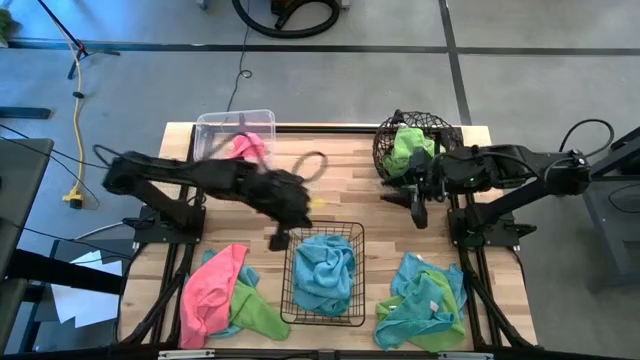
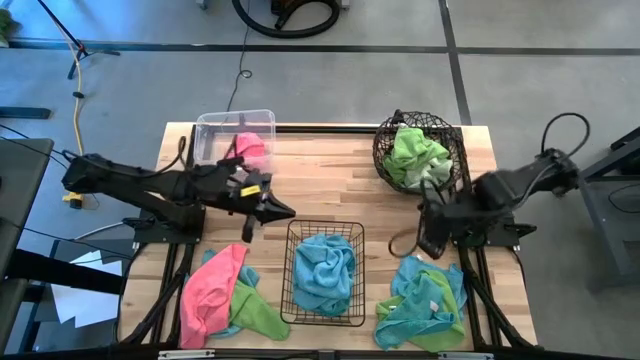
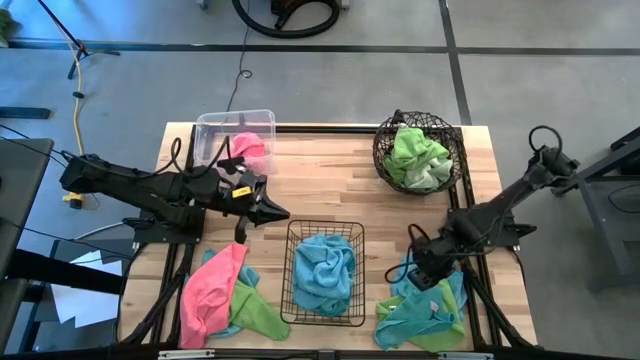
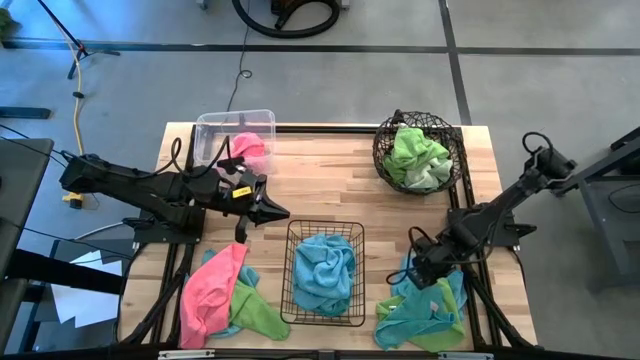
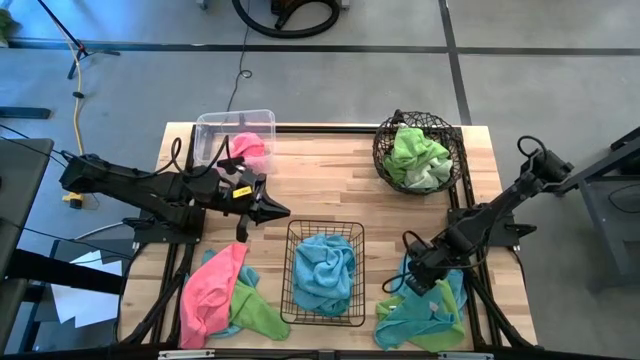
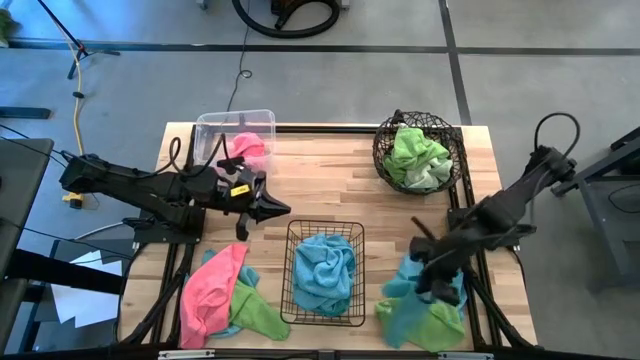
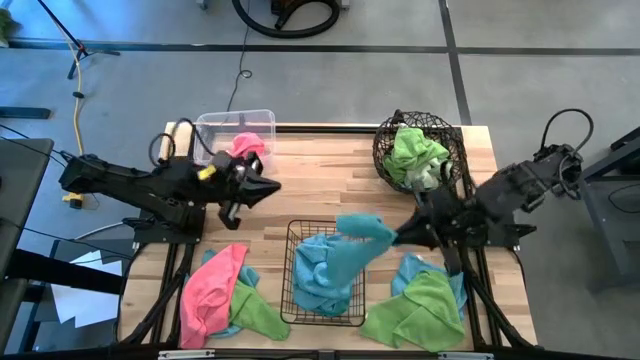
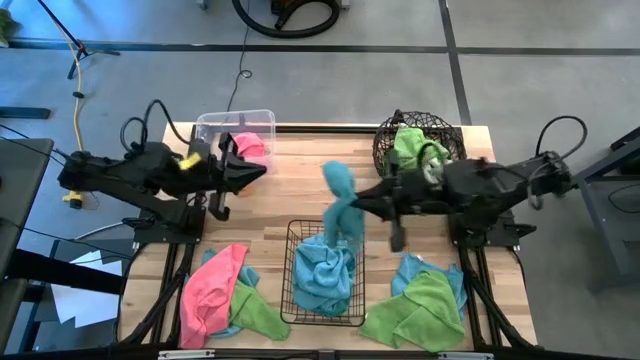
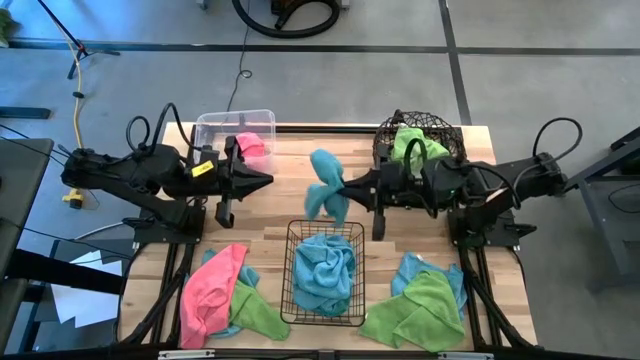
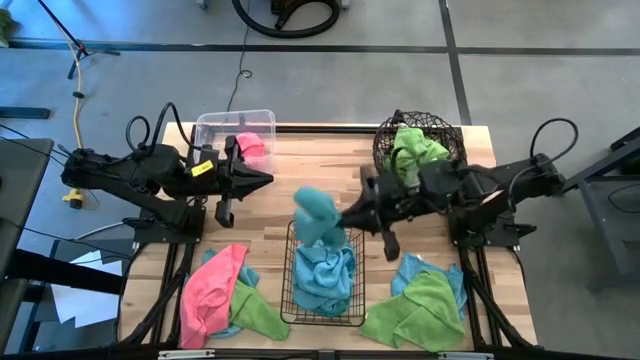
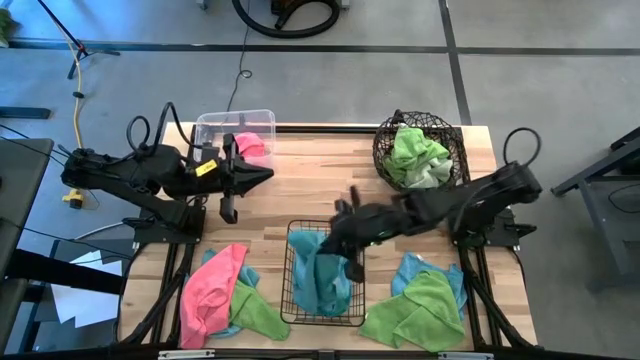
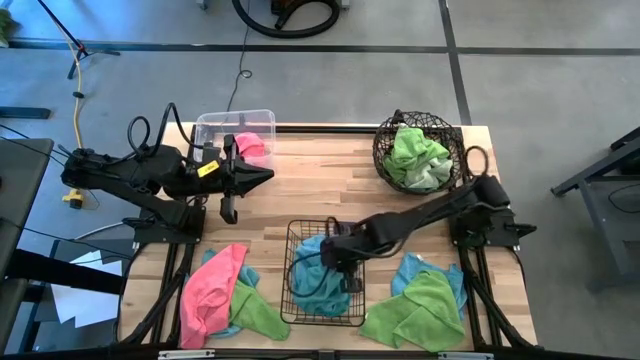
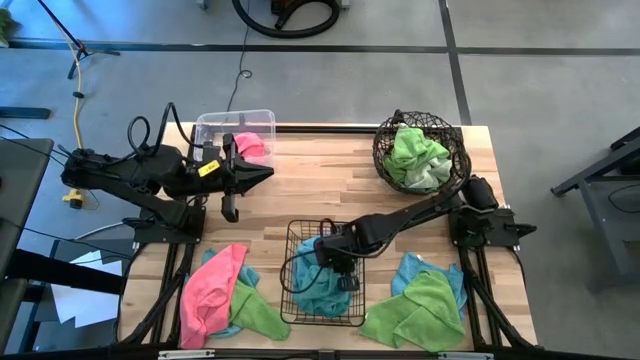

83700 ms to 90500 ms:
Task: Sort microfiber towel by color & place in baskets
Put the blue towel into the bottom basket

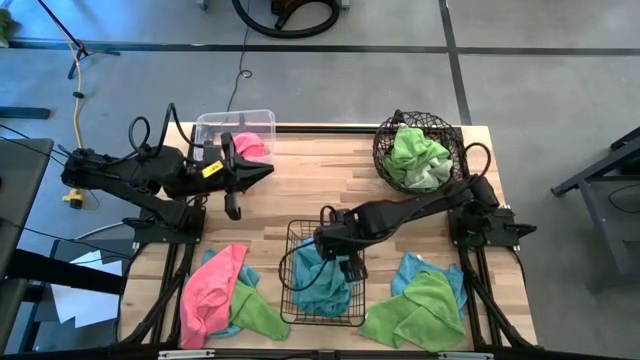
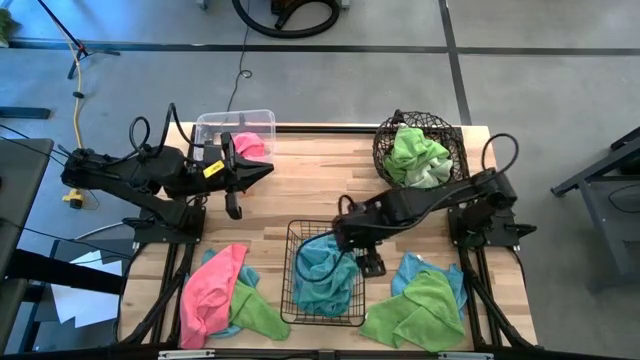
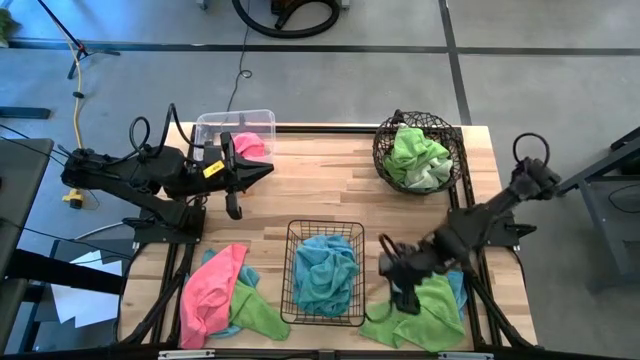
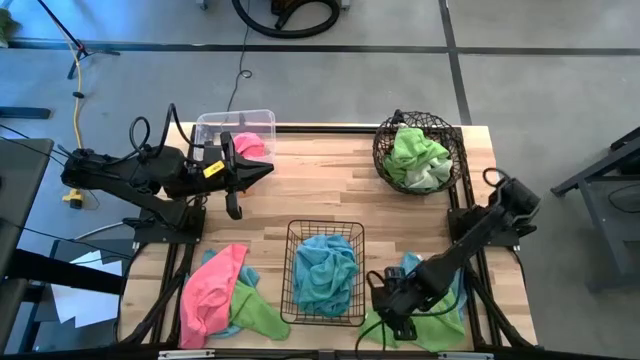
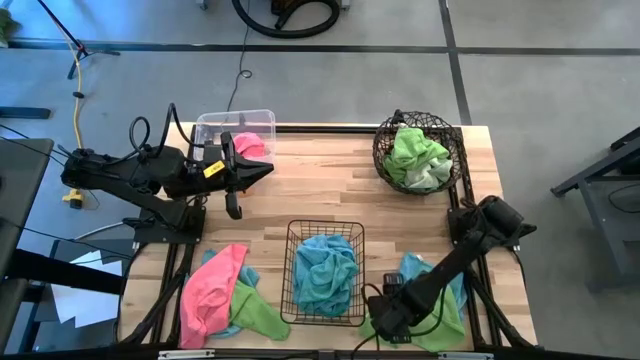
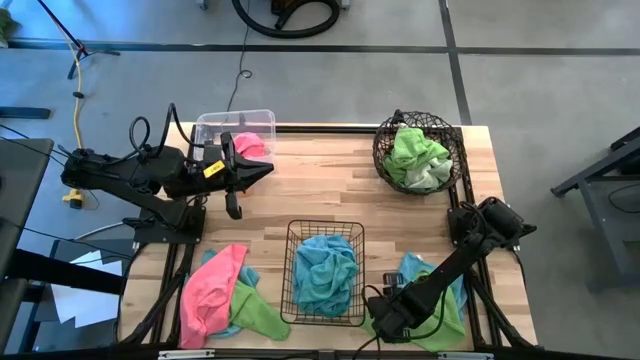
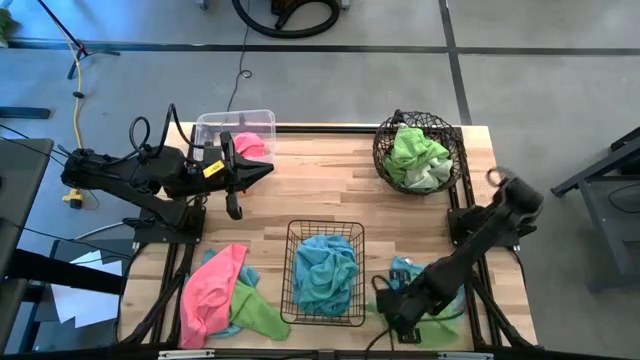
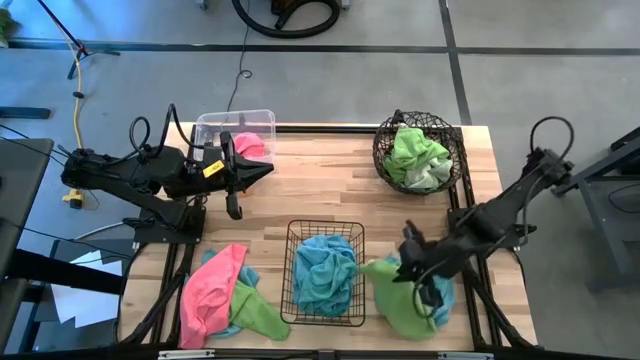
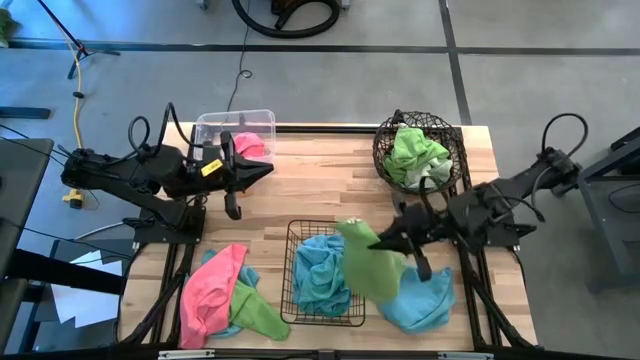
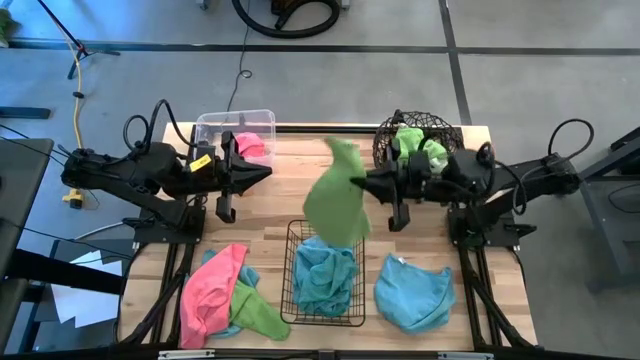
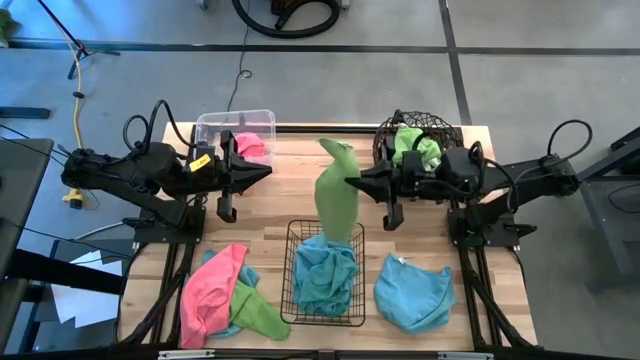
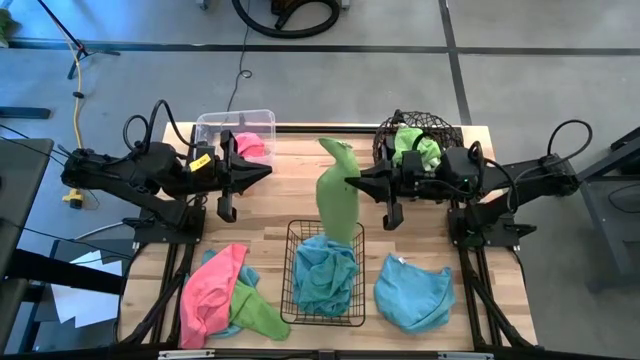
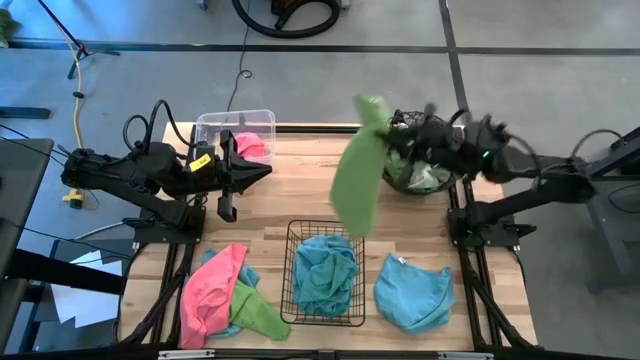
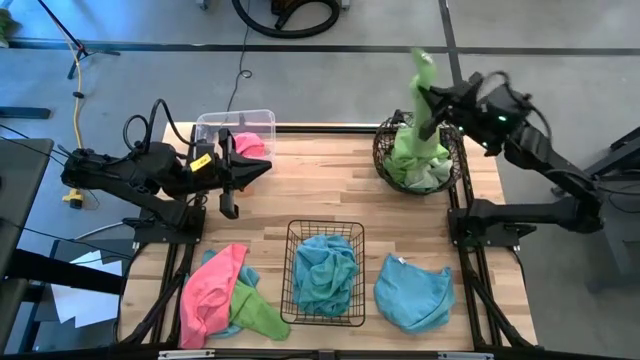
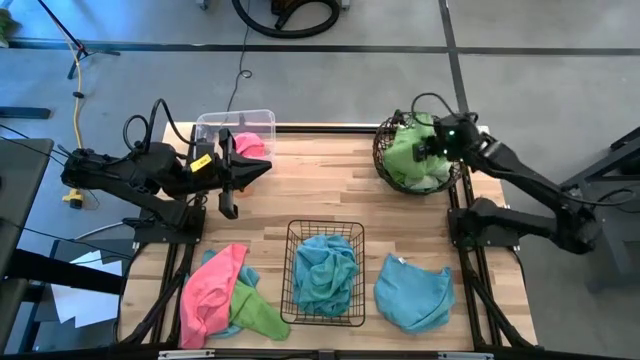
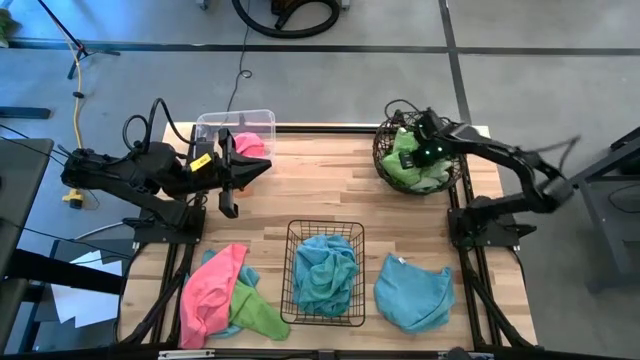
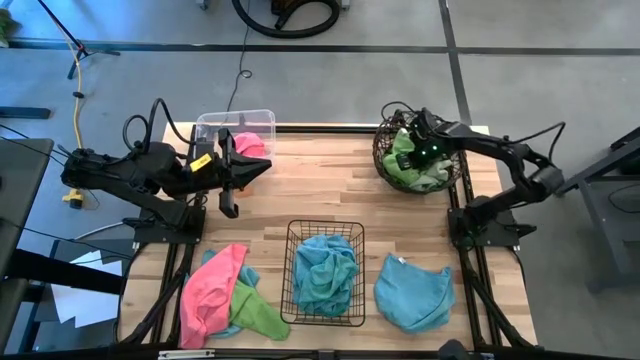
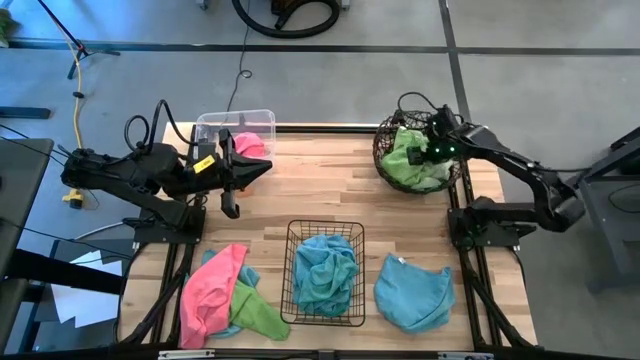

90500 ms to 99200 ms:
Put the right green towel into the top right basket

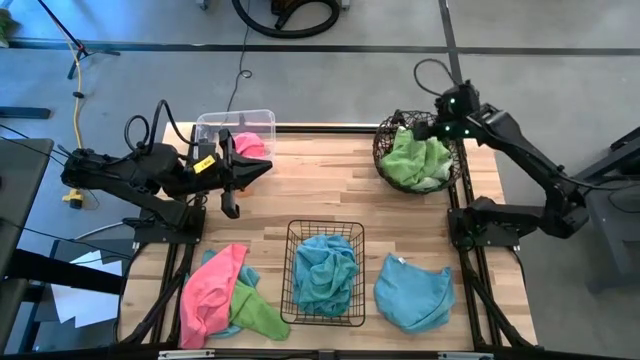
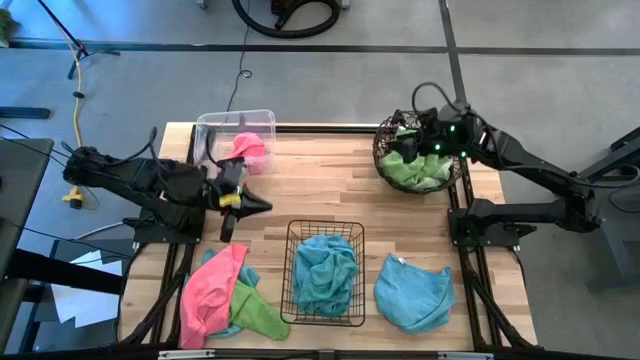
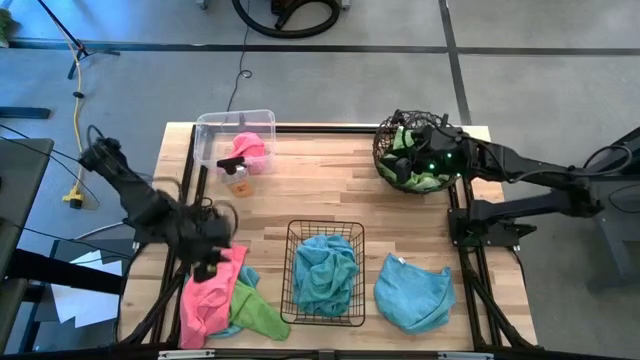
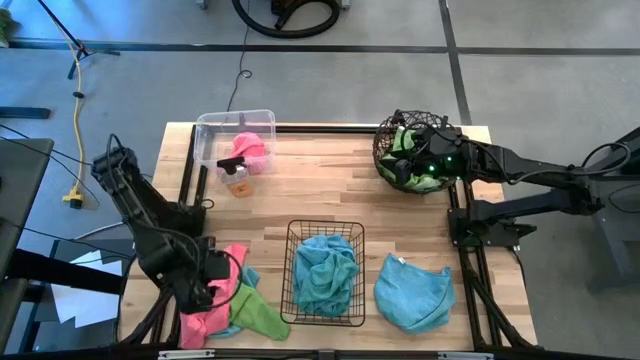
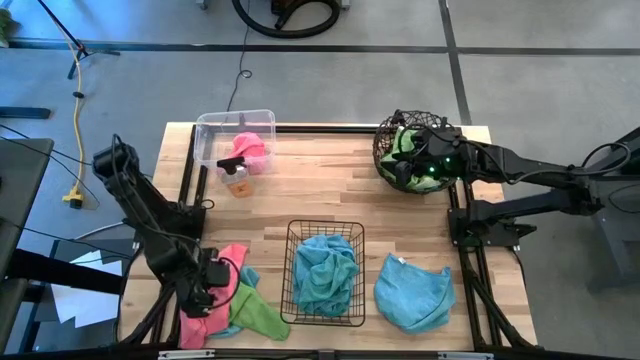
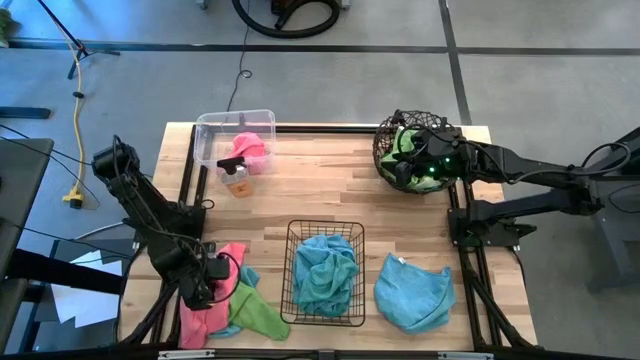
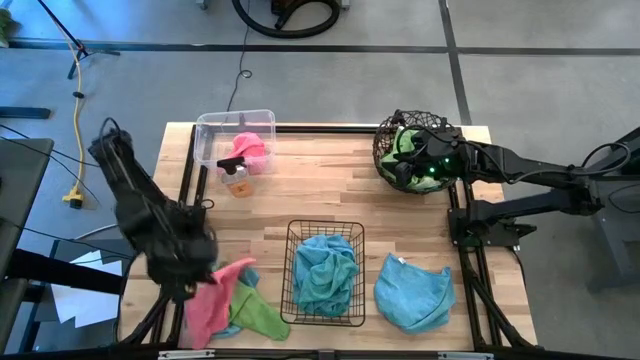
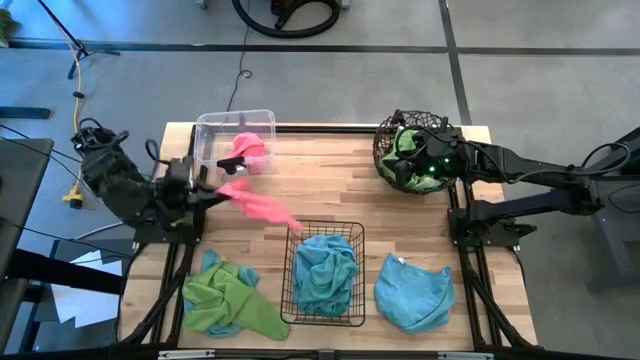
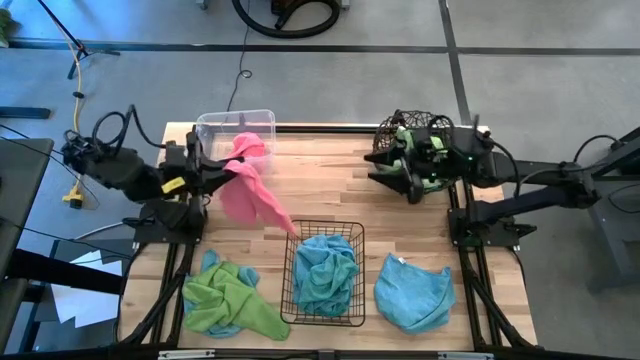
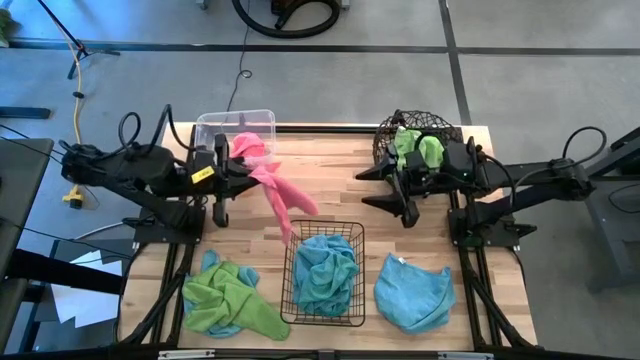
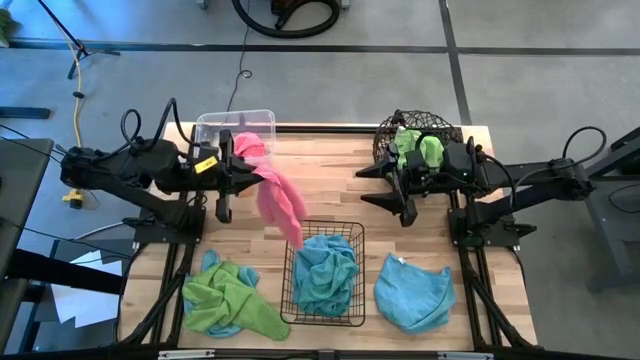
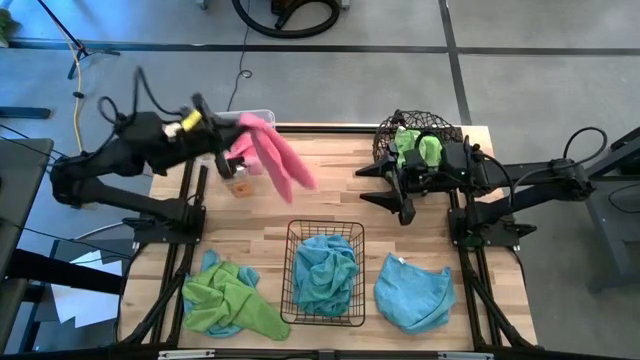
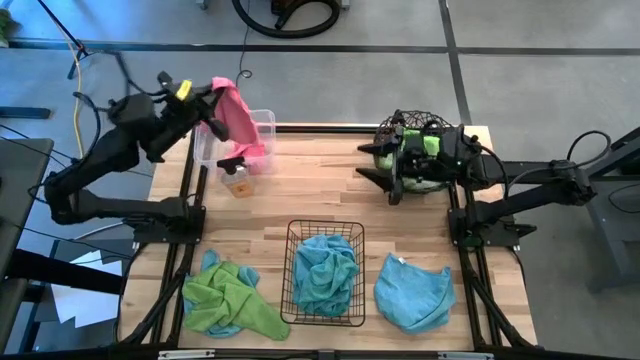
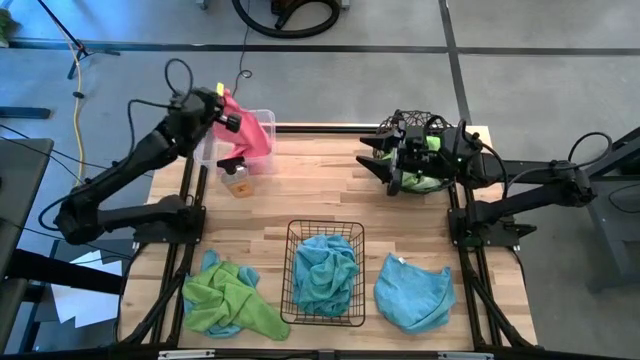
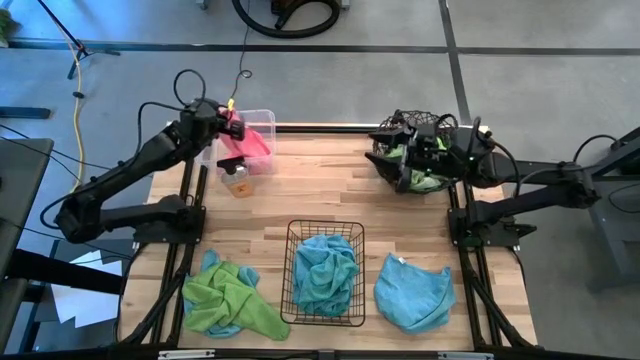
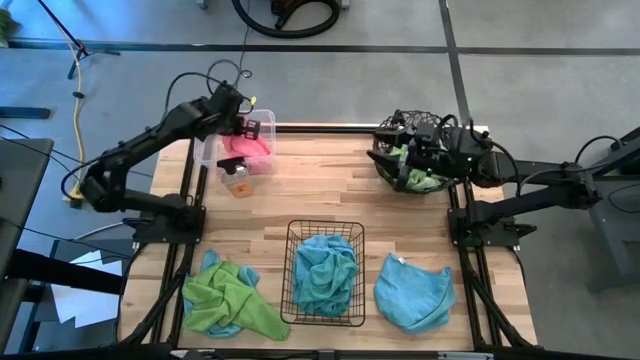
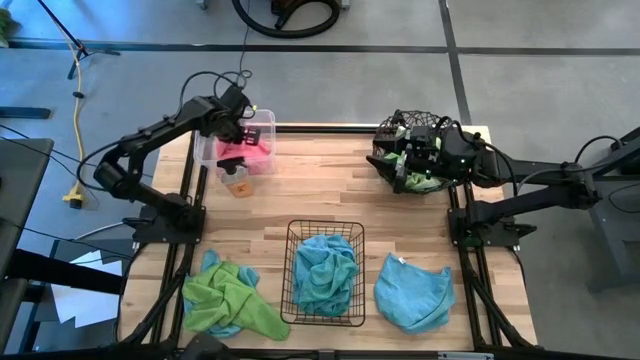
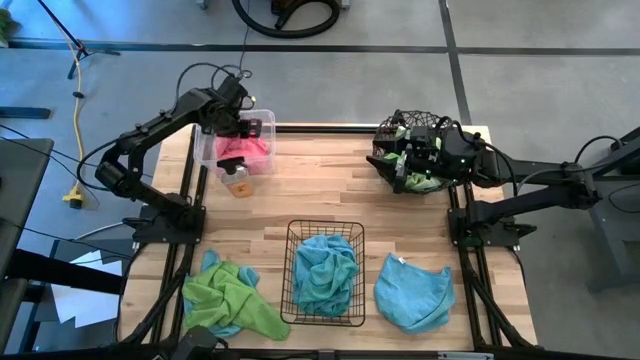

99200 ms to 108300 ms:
Put the pink towel into the left transparent bin
